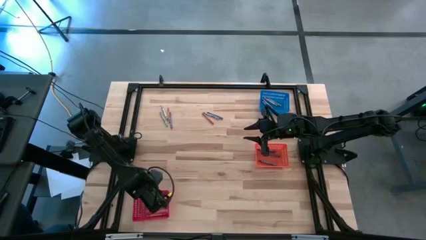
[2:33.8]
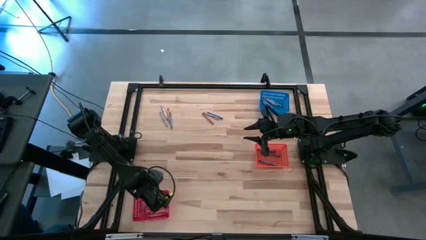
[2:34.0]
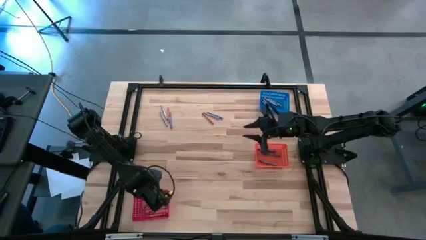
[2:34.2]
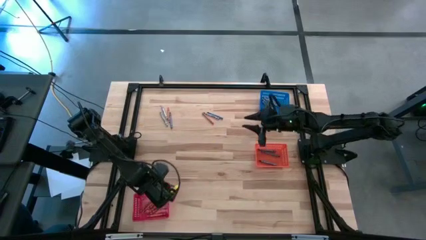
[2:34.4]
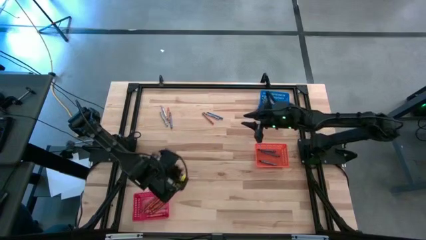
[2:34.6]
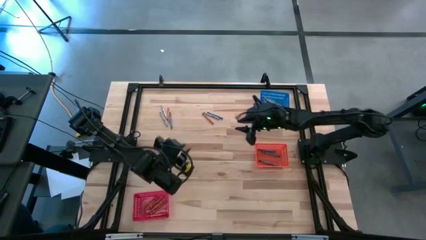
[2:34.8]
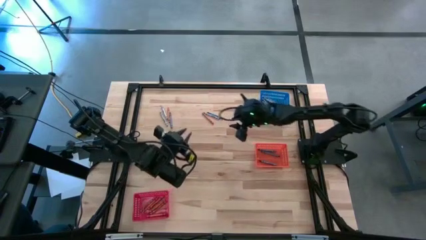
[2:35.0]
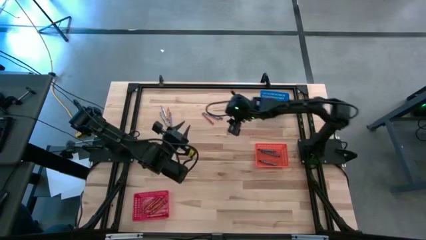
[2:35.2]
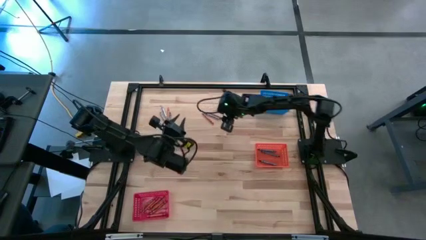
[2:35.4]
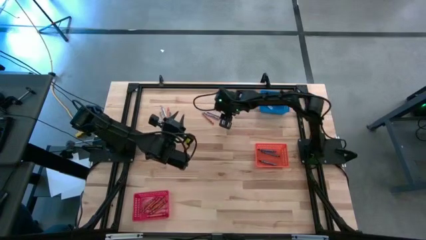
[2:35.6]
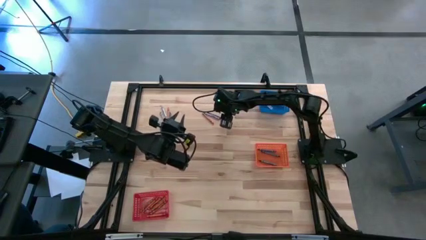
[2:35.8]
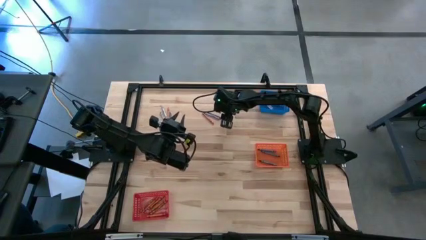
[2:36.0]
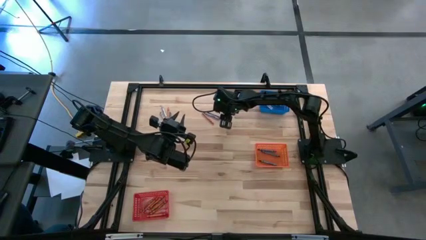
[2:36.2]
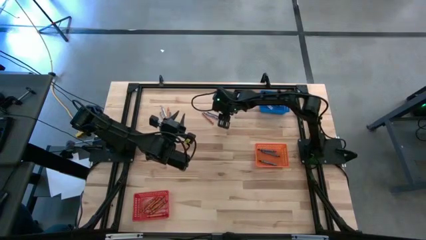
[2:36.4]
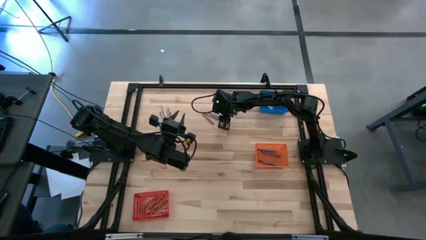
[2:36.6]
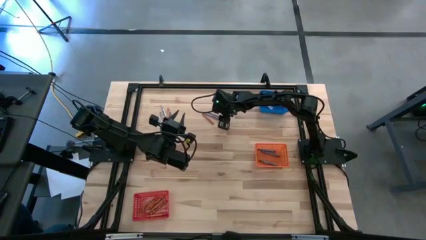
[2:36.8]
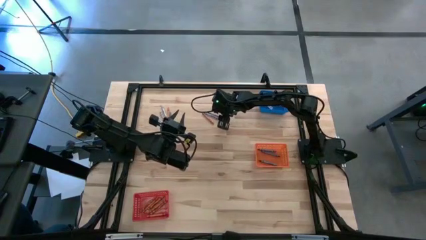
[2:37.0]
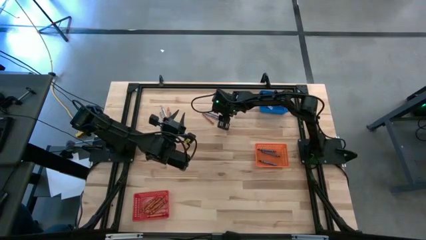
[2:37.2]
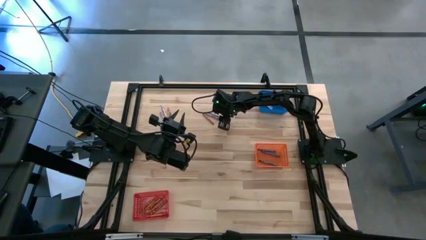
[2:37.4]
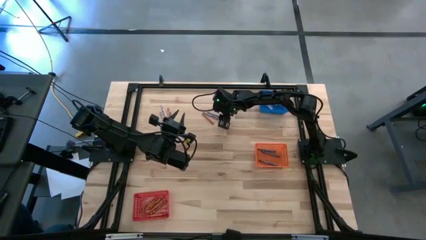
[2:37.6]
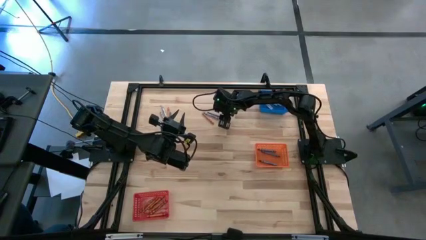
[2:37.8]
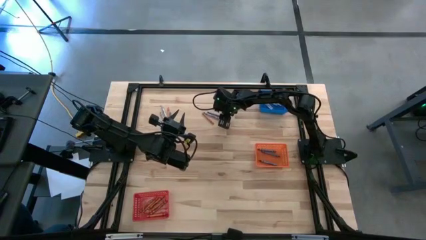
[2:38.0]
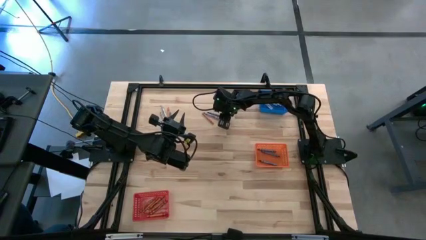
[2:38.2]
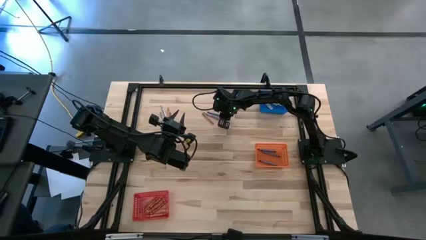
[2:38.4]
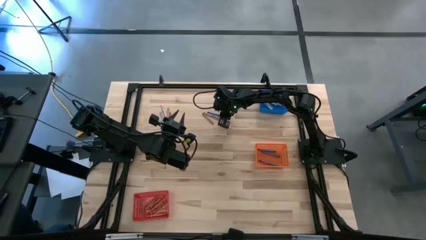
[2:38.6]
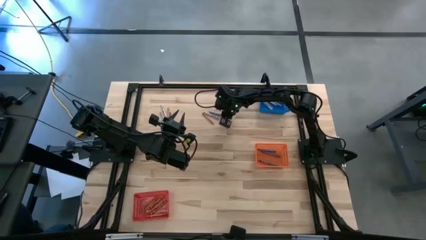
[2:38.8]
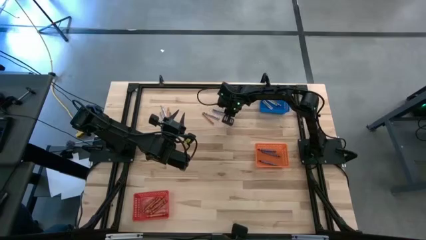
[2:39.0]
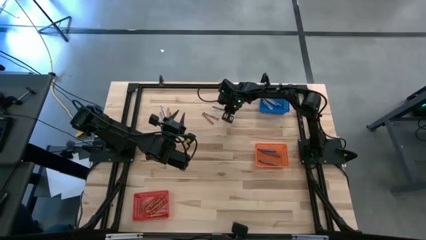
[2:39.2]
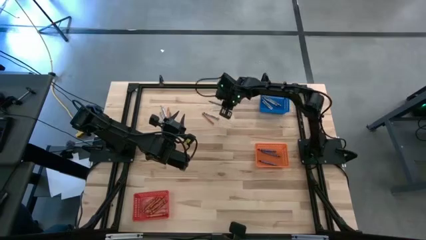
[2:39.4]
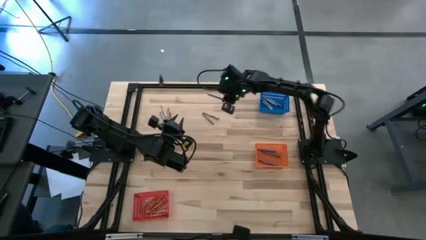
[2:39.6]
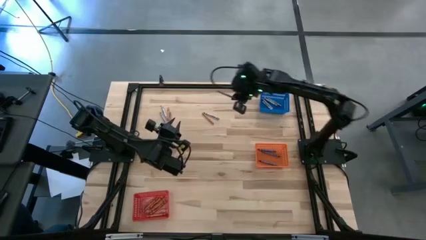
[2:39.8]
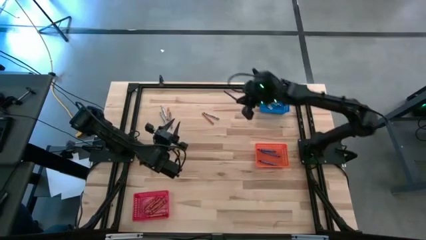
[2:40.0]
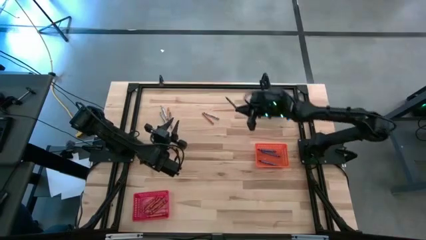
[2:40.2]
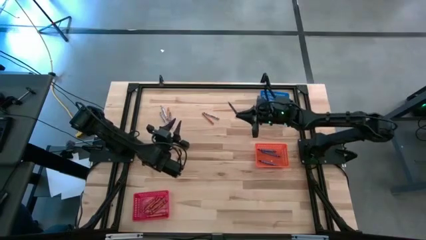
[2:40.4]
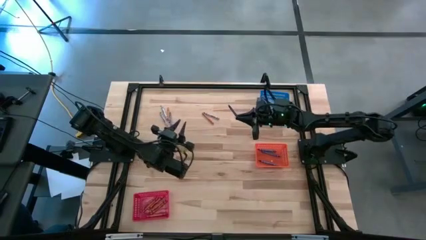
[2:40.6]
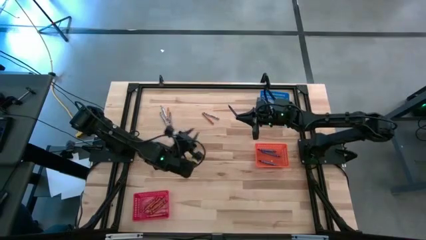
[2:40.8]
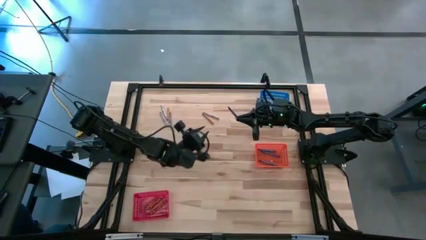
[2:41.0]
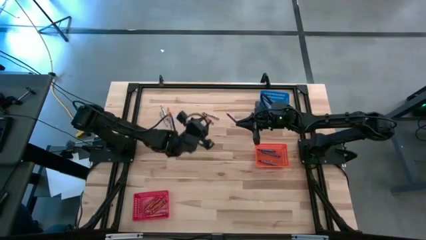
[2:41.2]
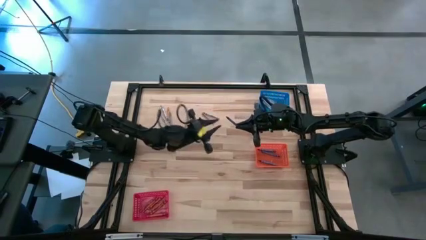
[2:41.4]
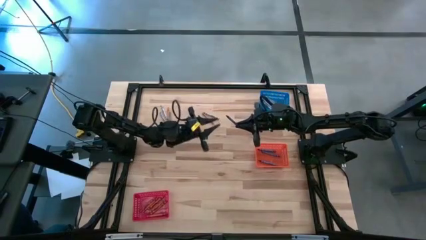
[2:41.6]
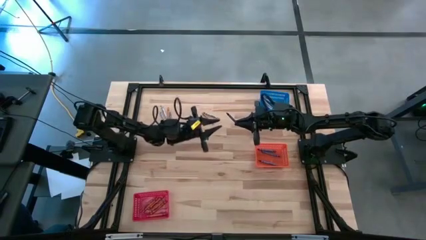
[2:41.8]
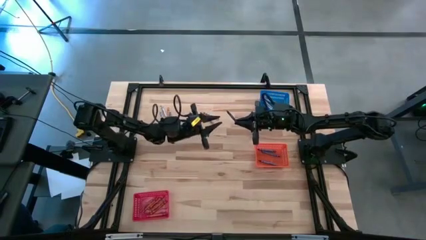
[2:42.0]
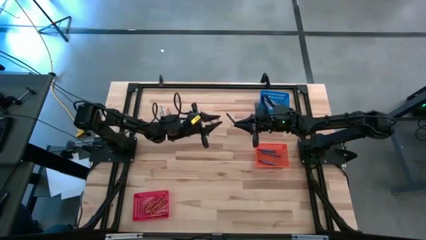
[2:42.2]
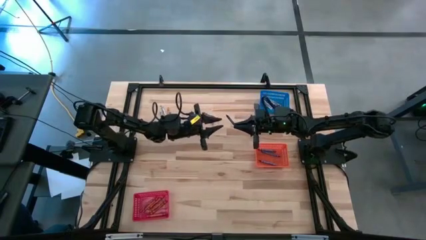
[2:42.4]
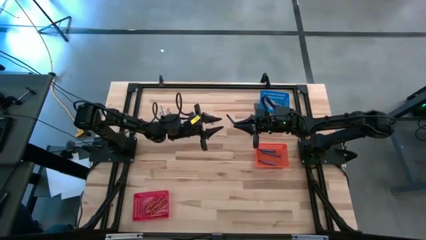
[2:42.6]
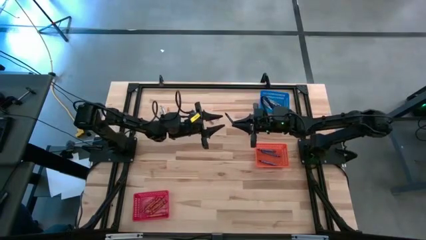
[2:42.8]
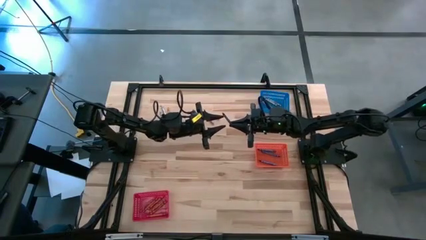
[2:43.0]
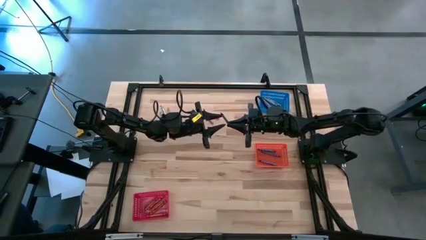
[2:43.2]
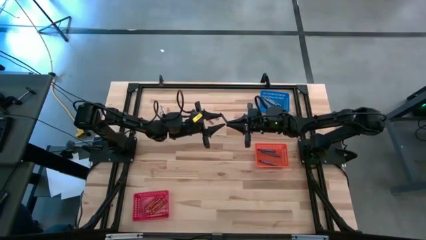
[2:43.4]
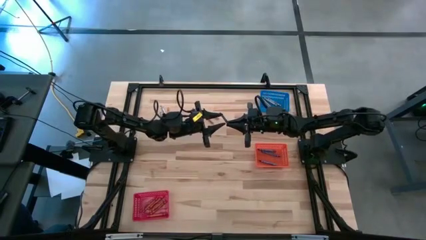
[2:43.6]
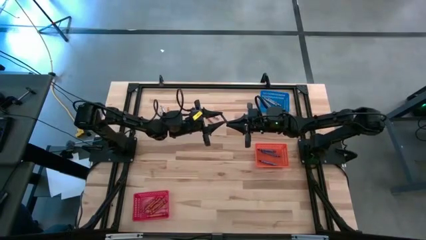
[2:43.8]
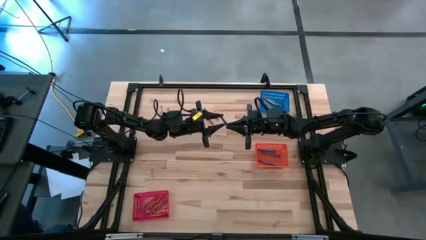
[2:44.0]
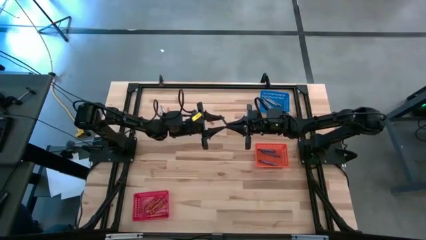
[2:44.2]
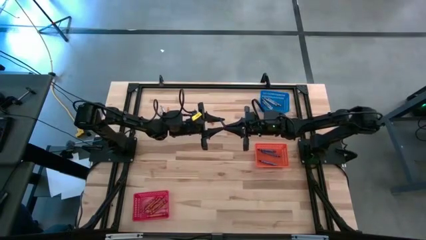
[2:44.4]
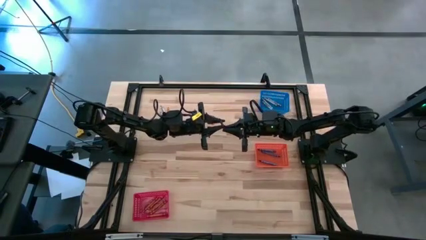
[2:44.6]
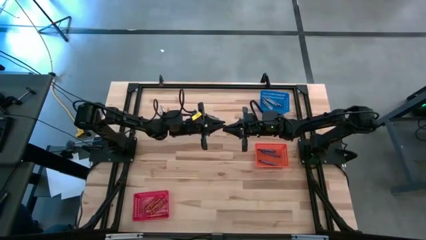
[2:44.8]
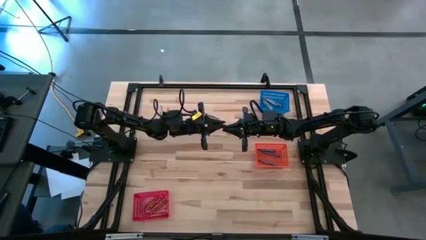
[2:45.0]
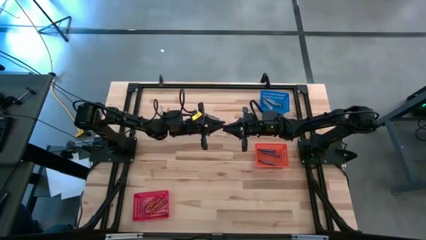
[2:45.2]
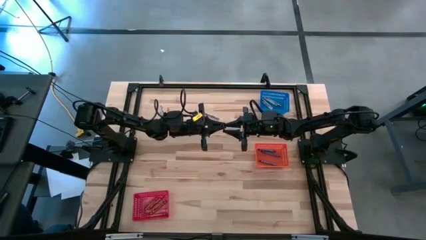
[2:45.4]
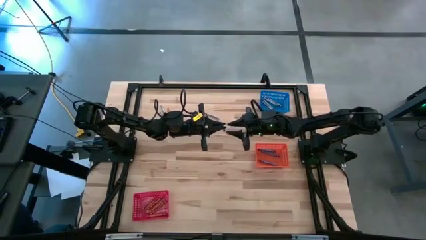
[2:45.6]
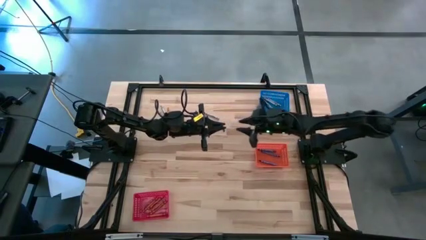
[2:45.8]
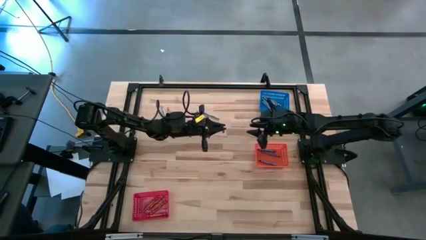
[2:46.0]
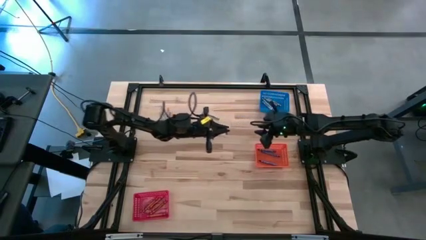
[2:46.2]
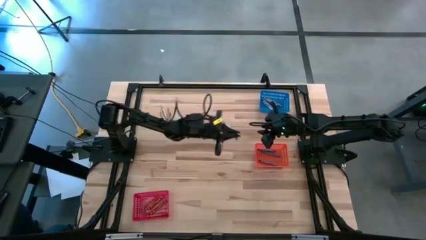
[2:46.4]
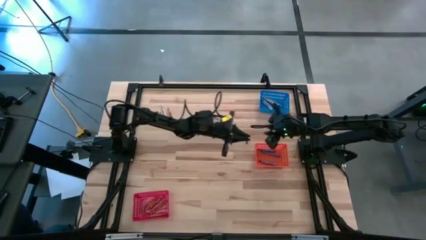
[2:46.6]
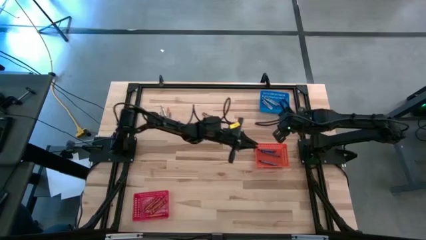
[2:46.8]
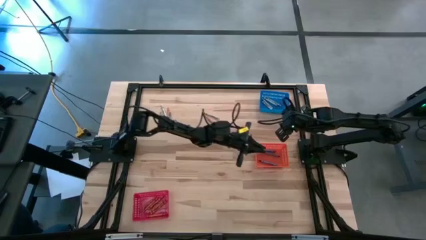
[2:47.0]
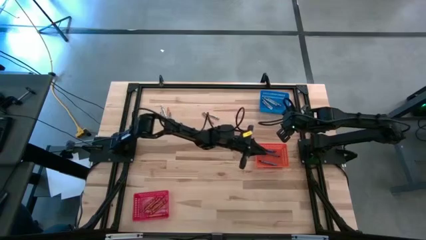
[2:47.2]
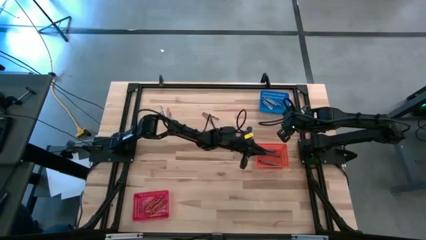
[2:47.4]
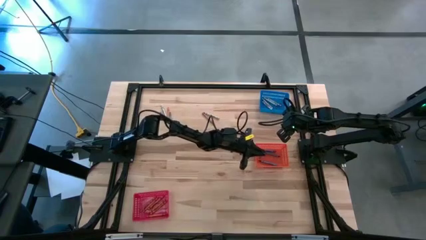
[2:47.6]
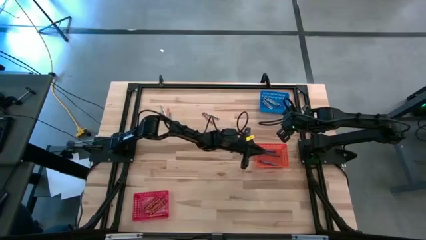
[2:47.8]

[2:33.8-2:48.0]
Task: Sort crayons
Put the blue crayon into the orange bin

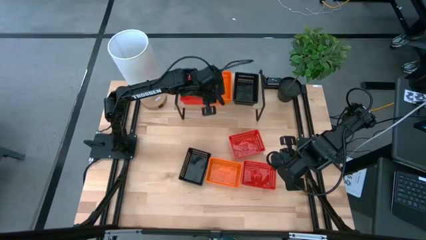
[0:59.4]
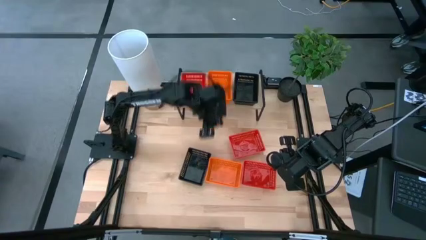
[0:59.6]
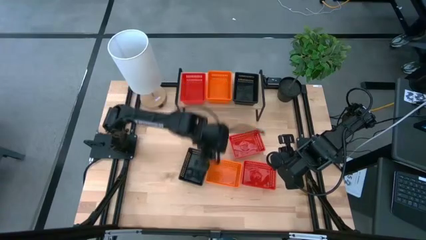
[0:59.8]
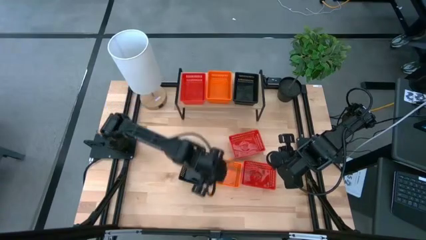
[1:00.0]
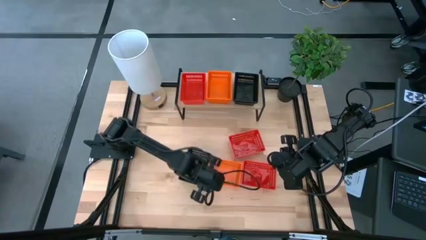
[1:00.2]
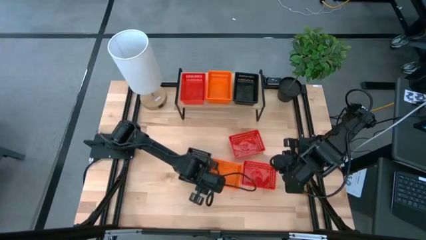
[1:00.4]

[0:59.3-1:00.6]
Task: Stack baskets on shelf by color
Stack the orange basket on the stacked orange baskets on the shelf
